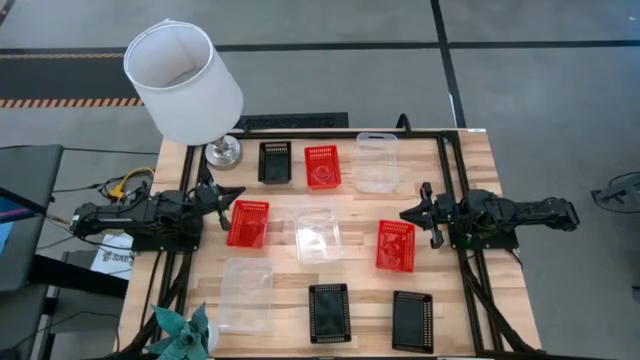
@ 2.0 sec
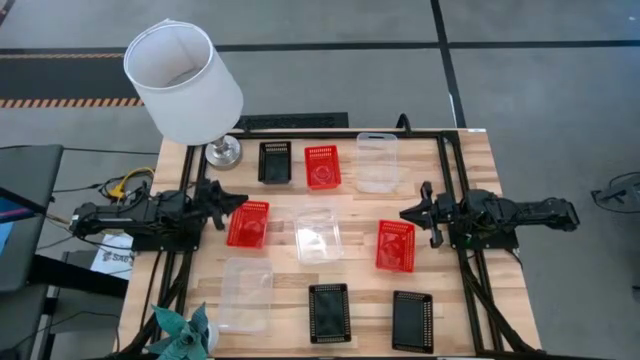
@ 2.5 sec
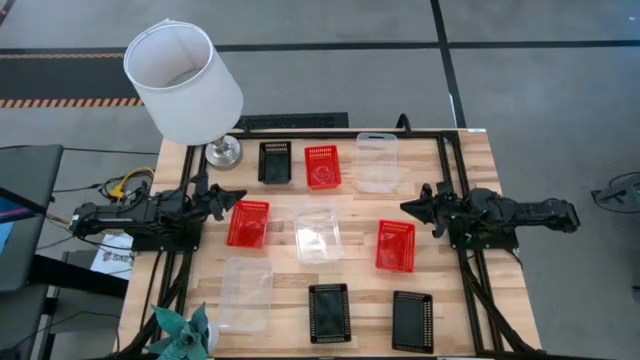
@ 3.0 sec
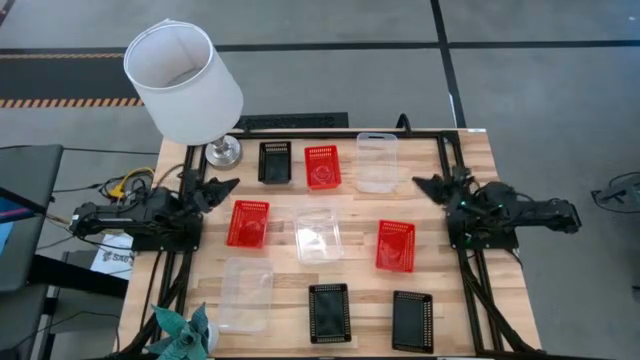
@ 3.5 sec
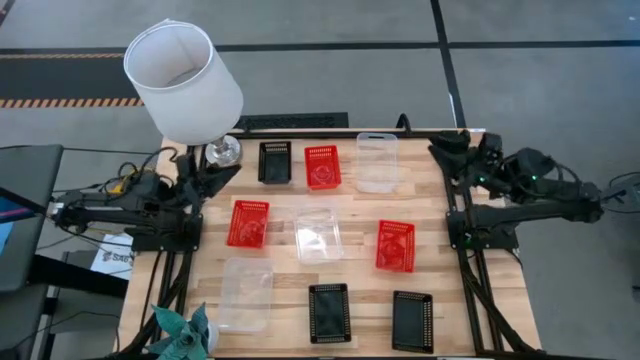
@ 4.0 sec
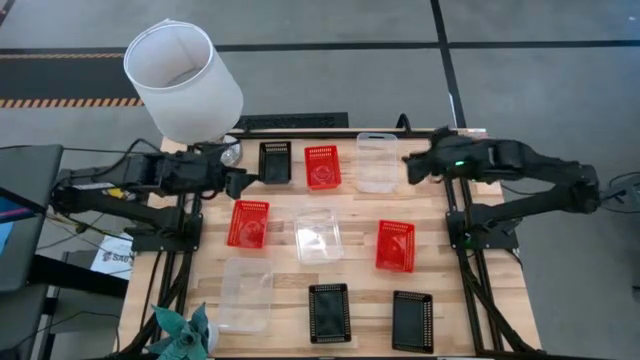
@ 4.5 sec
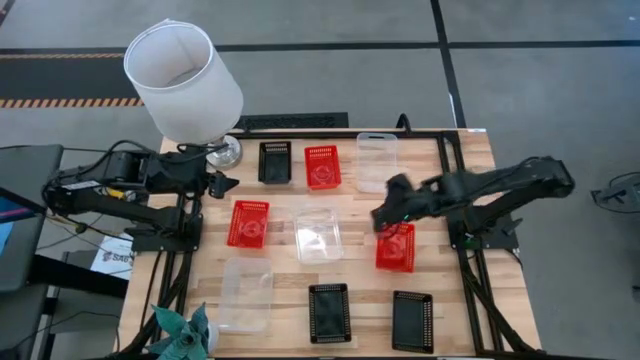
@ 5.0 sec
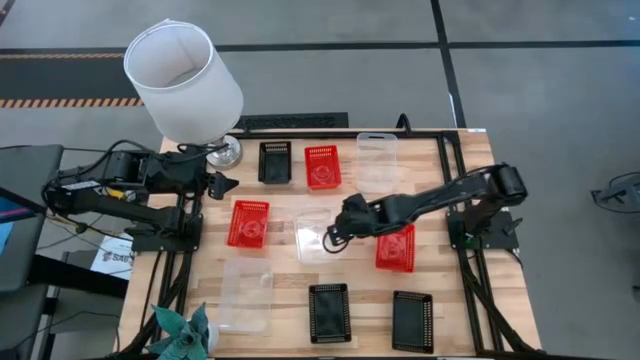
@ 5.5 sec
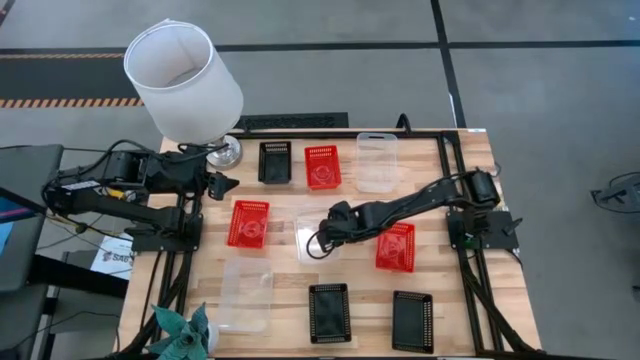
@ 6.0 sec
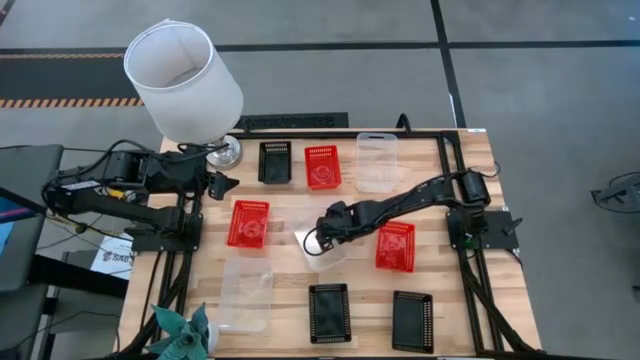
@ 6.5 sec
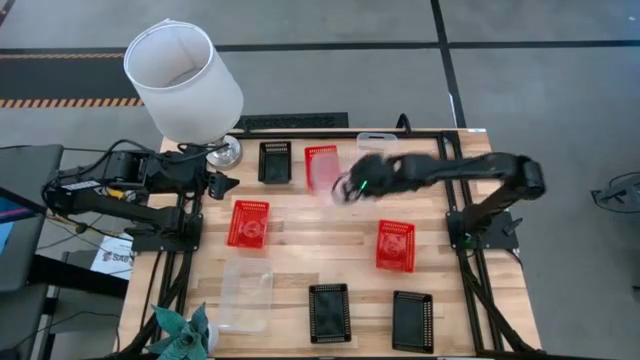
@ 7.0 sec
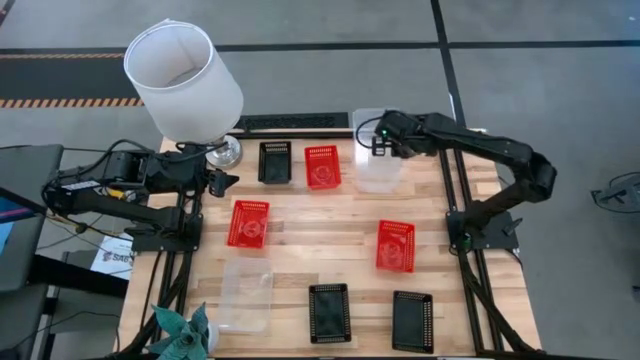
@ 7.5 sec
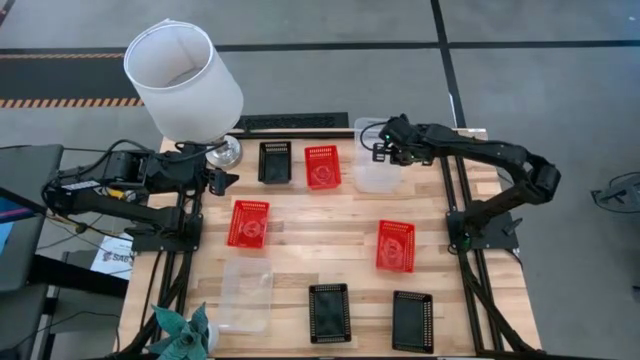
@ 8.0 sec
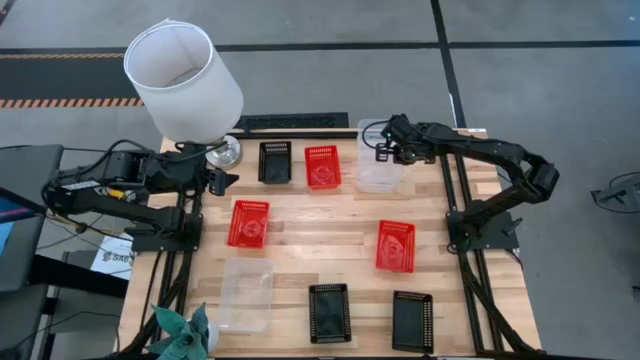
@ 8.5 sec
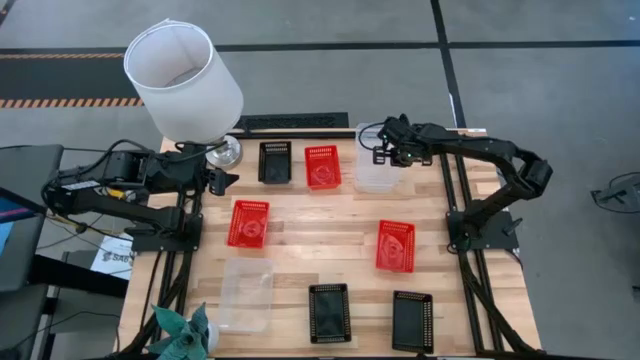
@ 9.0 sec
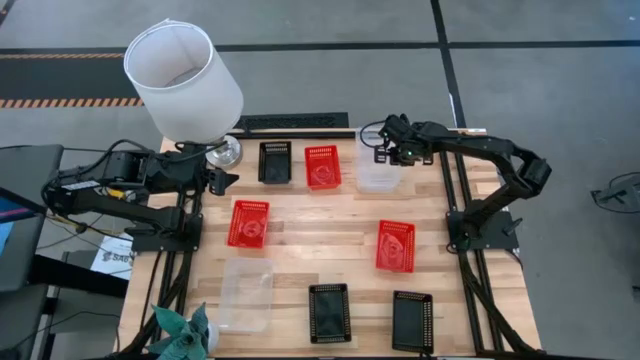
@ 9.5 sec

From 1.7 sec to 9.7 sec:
Stack the middle transparent bin on the top transparent bin

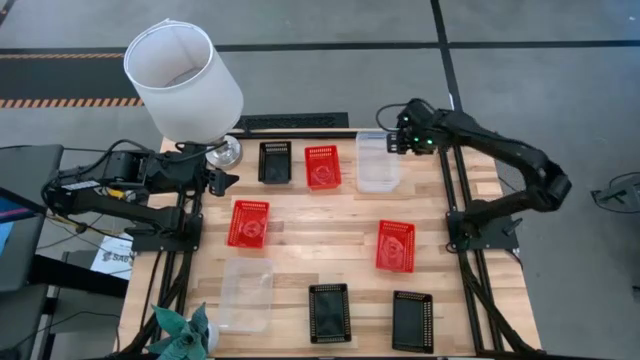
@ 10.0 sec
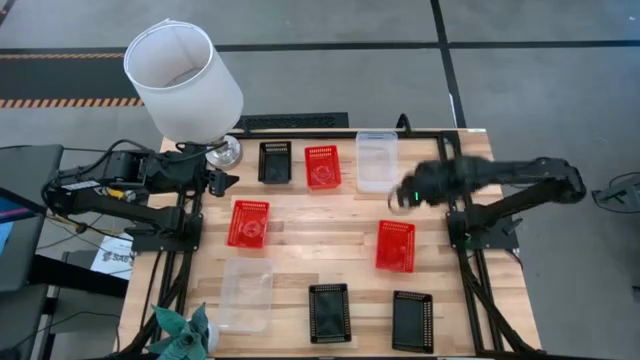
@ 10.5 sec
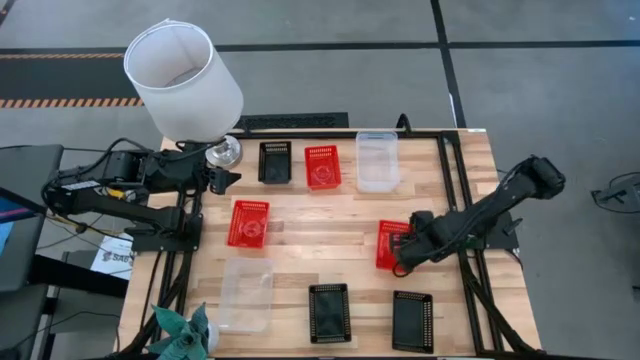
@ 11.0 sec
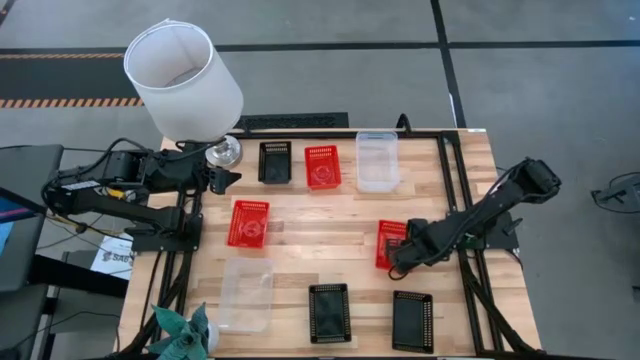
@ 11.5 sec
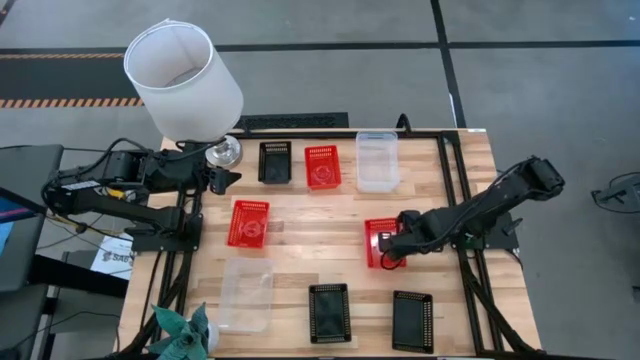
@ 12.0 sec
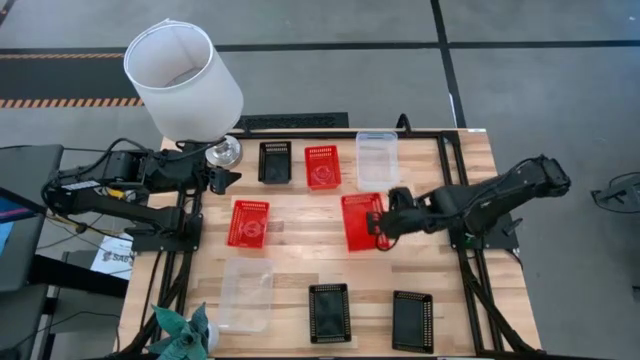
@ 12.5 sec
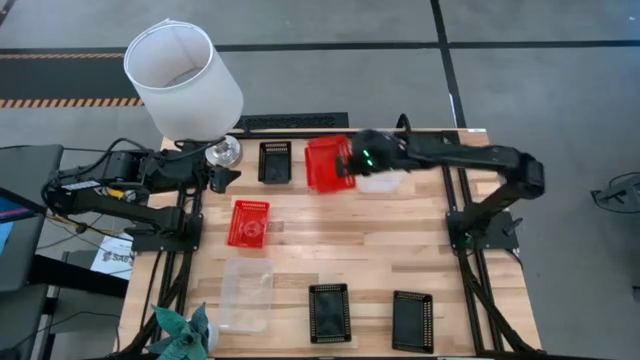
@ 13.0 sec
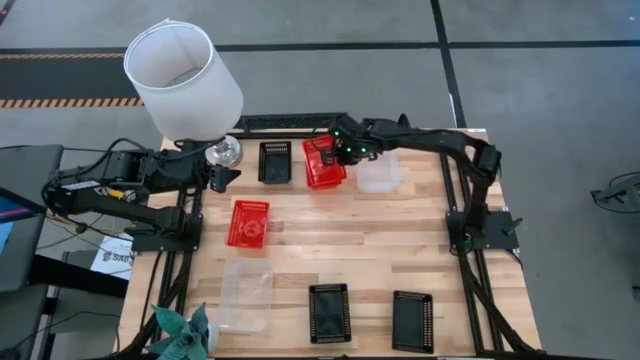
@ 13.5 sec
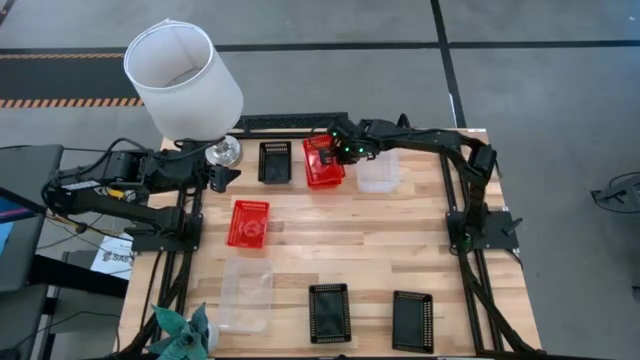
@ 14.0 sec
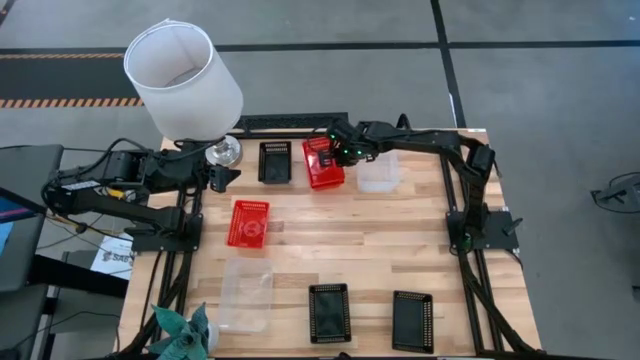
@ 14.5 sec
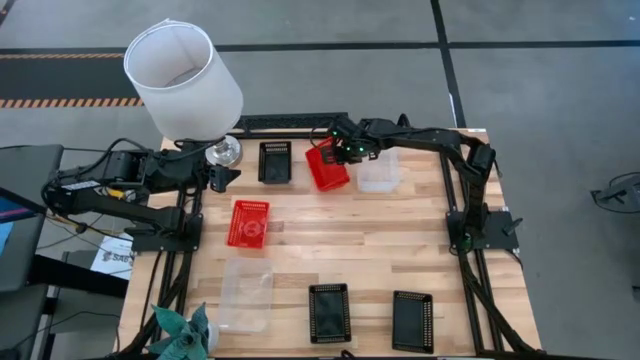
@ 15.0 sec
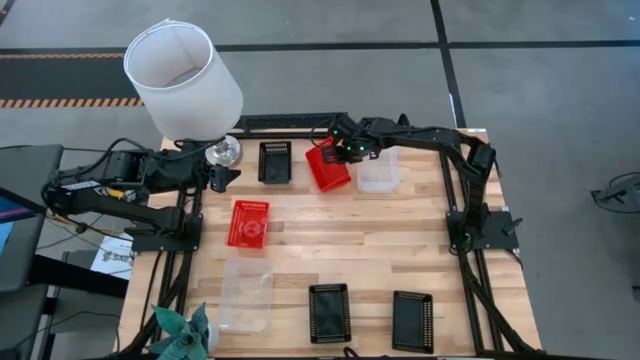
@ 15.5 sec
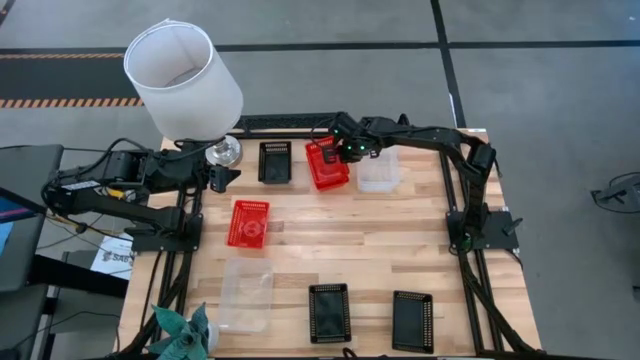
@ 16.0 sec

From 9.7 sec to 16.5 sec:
Stack the bottom right red bin on the top red bin

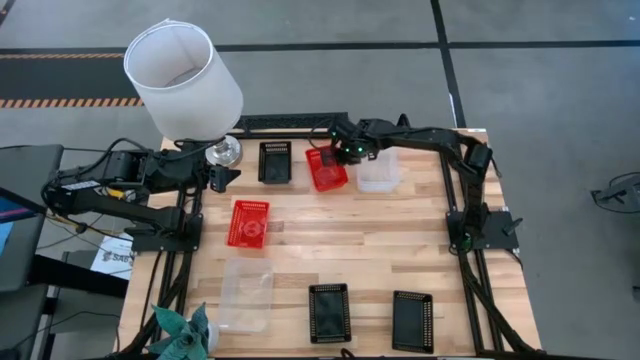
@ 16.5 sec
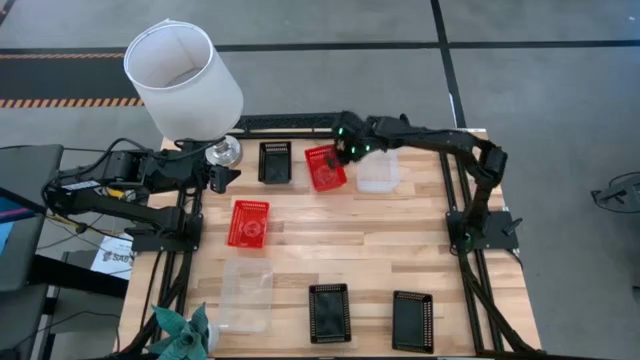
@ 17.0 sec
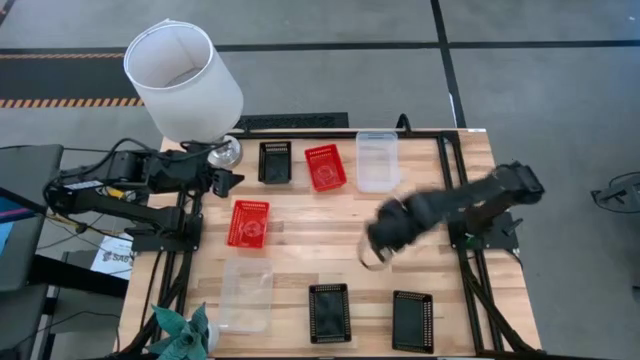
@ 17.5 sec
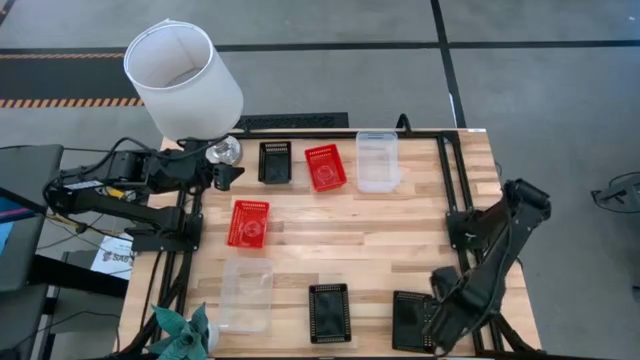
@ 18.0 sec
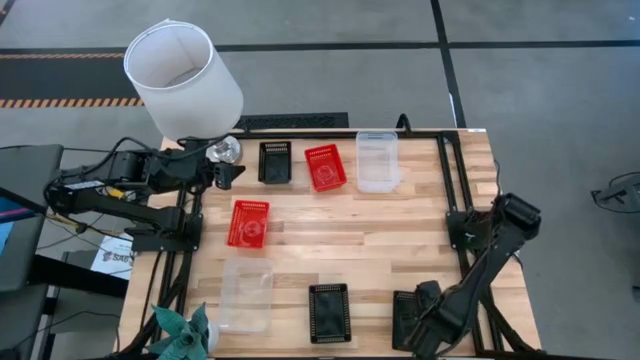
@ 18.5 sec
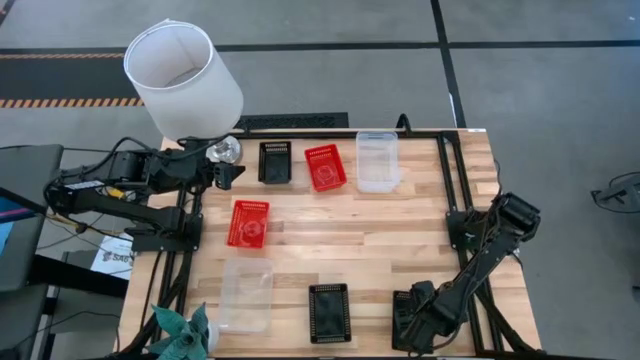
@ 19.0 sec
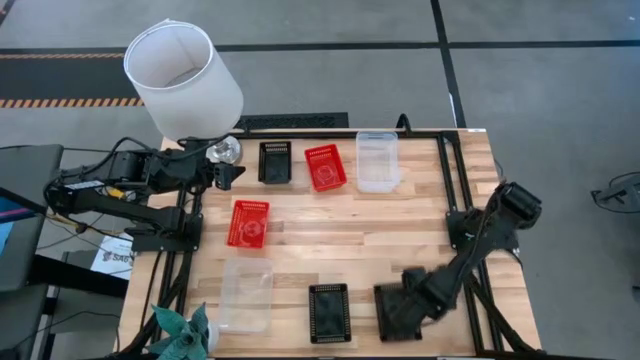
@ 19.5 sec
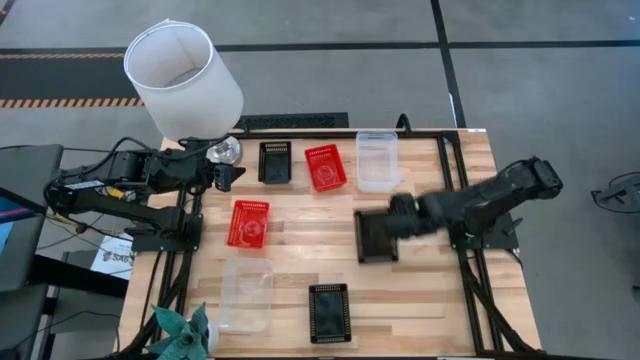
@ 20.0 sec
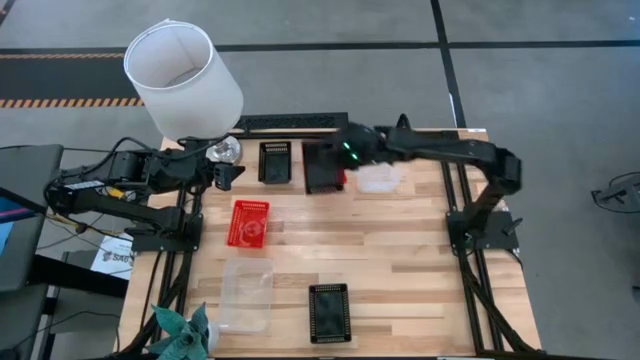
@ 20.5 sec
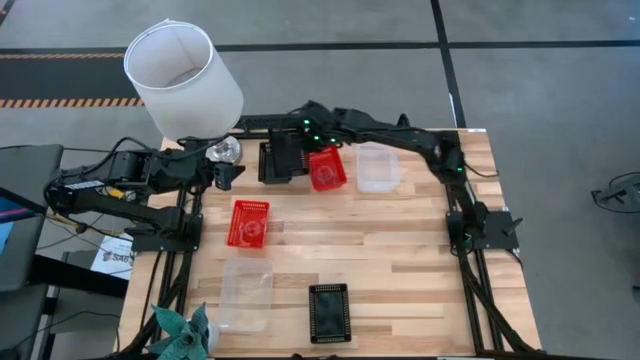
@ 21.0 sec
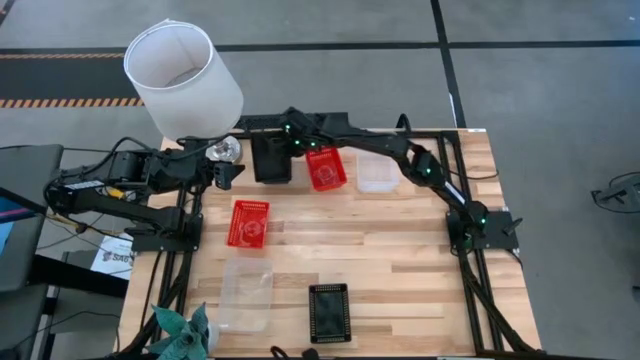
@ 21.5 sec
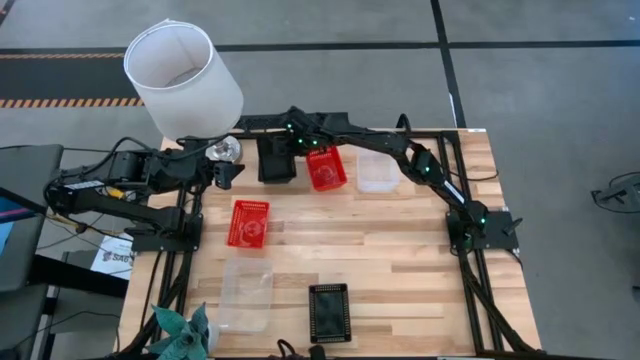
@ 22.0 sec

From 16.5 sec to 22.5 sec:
Stack the bottom right black bin on the top black bin
